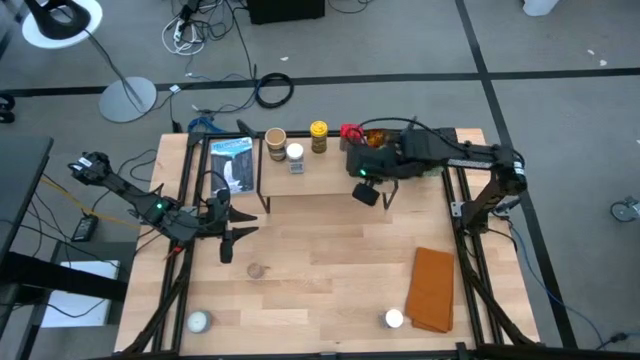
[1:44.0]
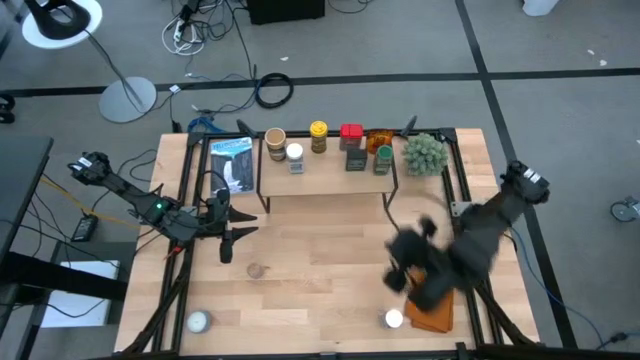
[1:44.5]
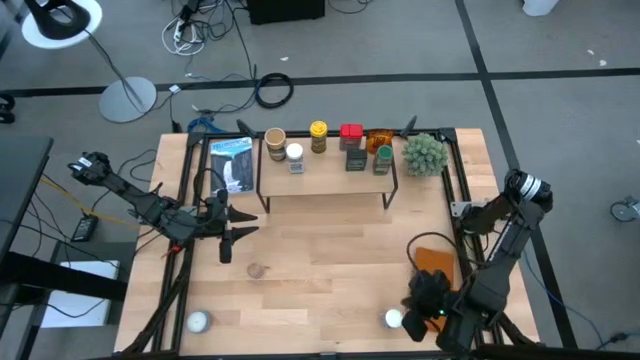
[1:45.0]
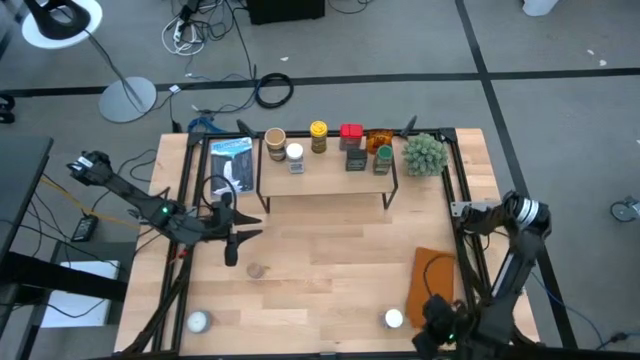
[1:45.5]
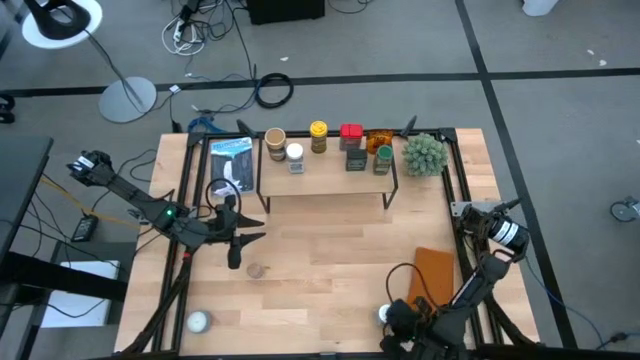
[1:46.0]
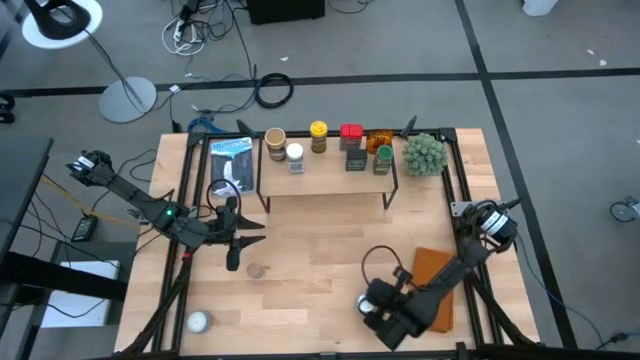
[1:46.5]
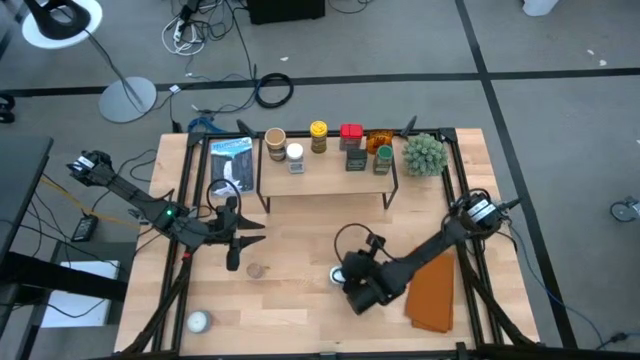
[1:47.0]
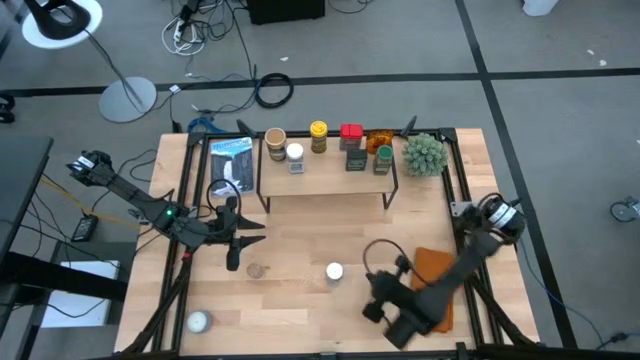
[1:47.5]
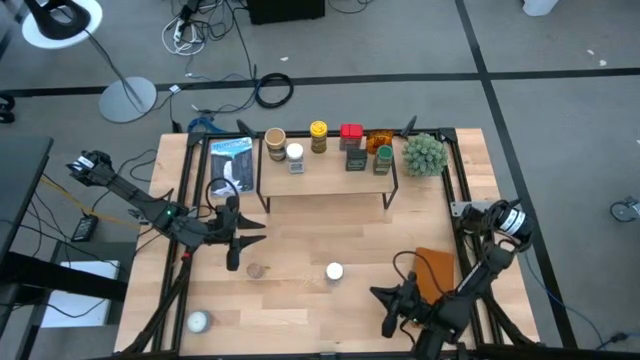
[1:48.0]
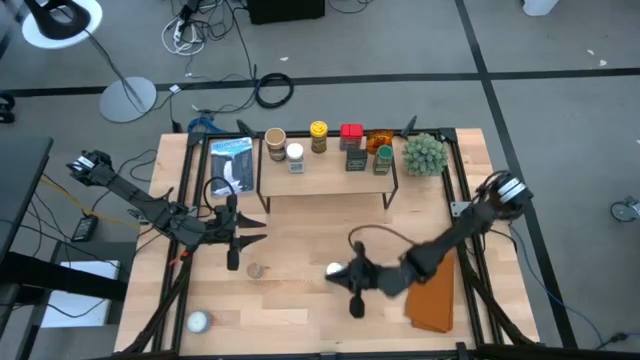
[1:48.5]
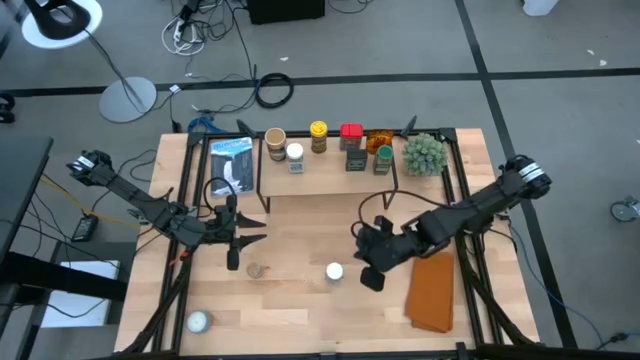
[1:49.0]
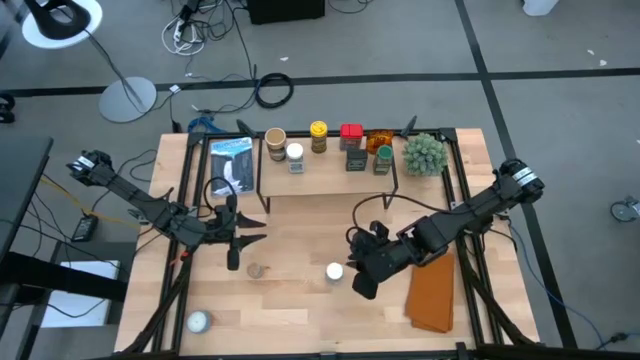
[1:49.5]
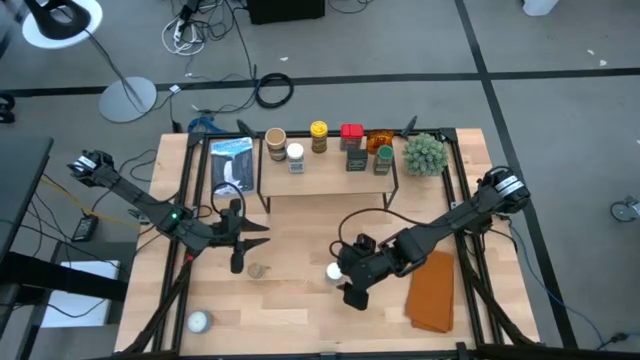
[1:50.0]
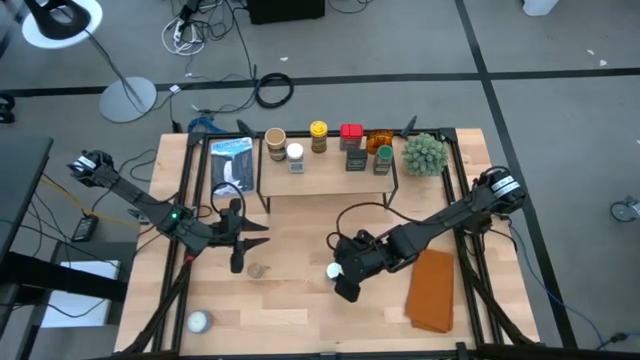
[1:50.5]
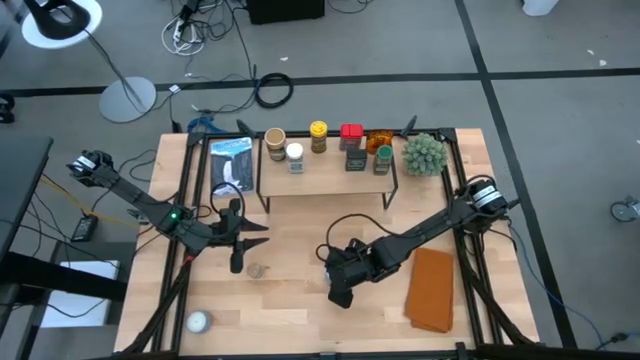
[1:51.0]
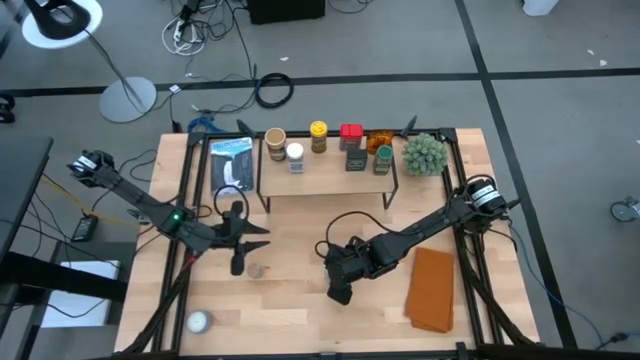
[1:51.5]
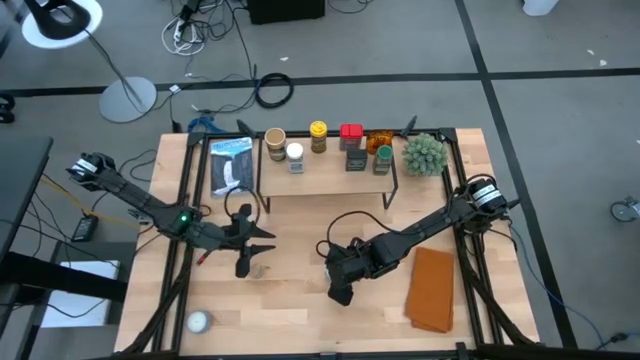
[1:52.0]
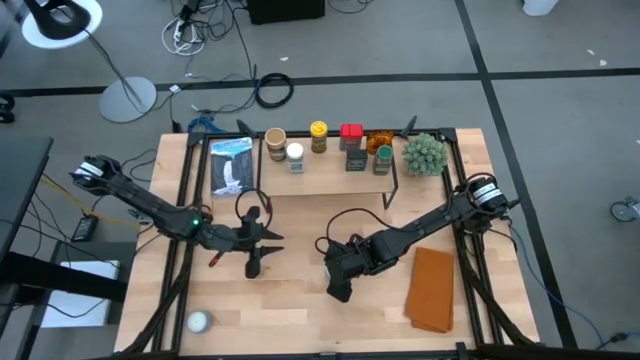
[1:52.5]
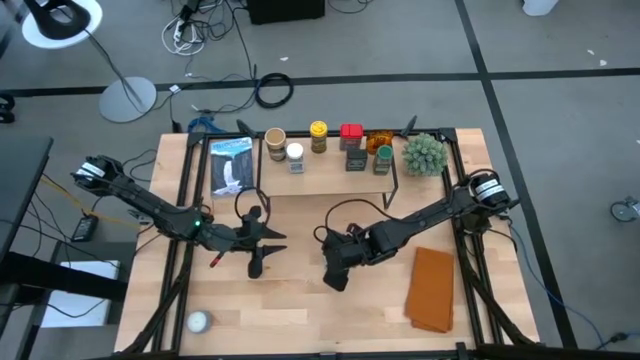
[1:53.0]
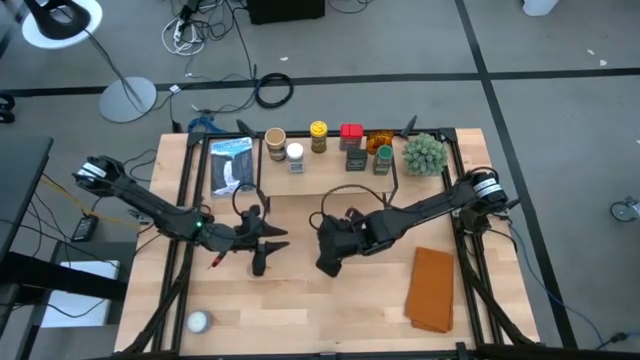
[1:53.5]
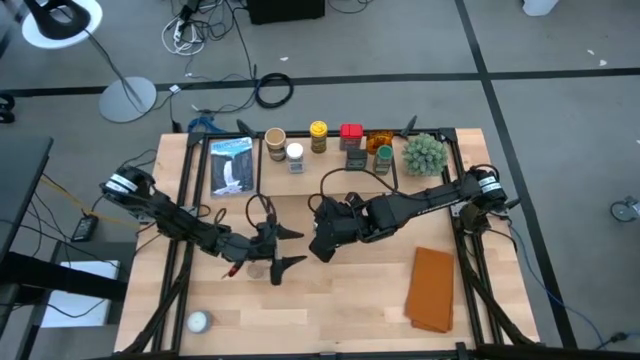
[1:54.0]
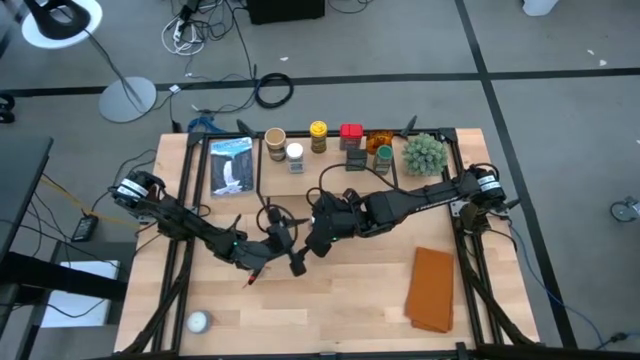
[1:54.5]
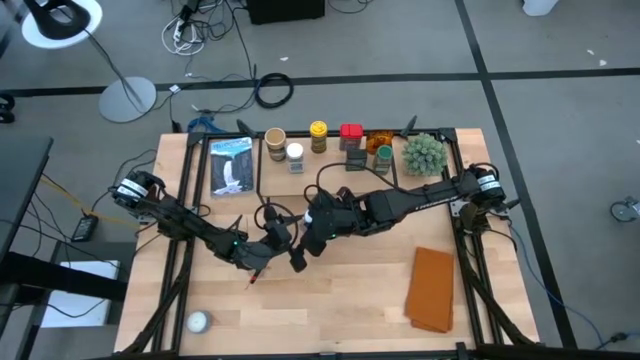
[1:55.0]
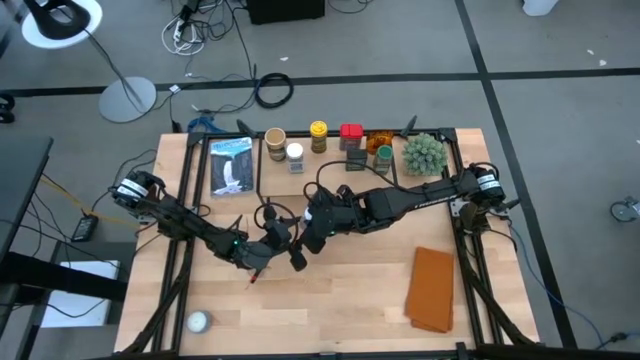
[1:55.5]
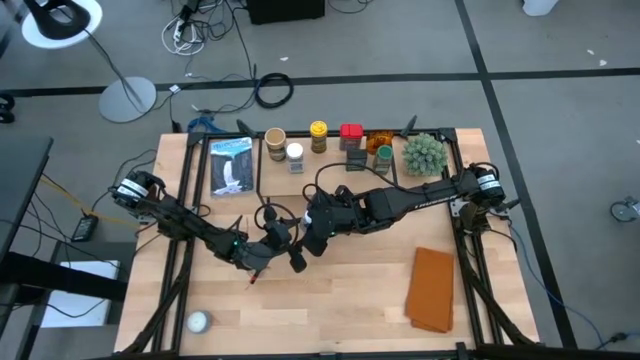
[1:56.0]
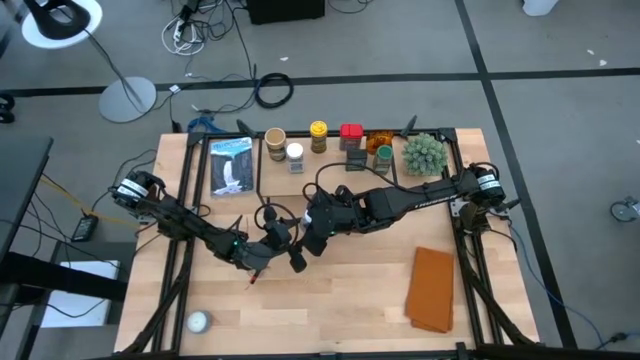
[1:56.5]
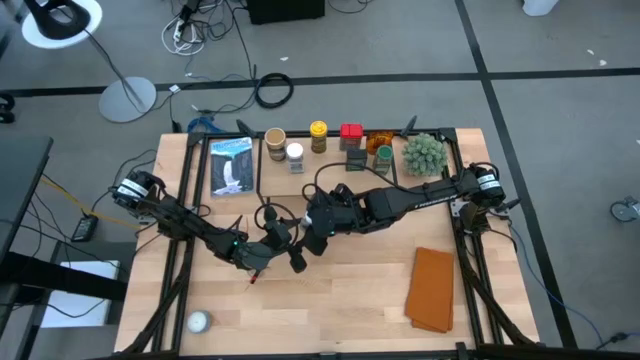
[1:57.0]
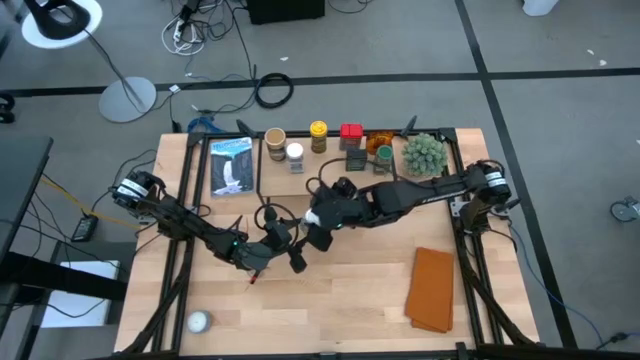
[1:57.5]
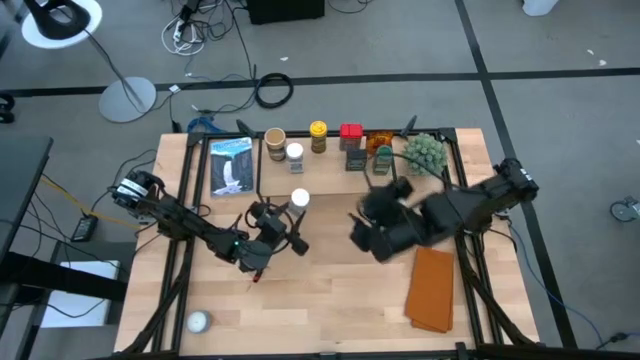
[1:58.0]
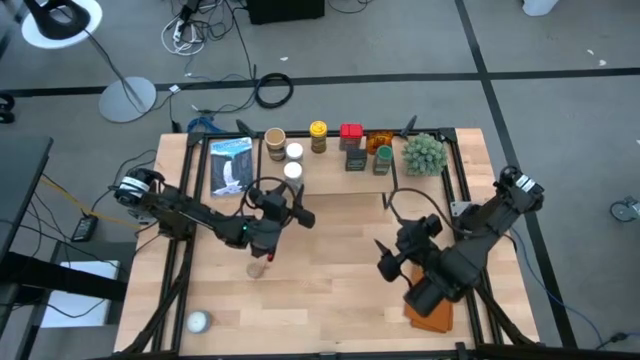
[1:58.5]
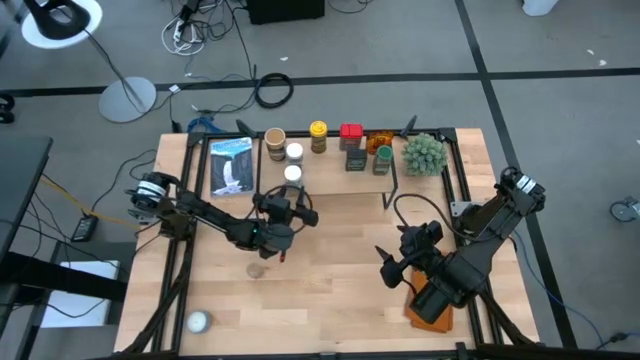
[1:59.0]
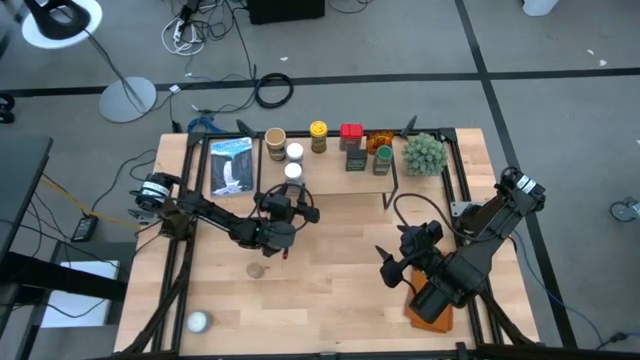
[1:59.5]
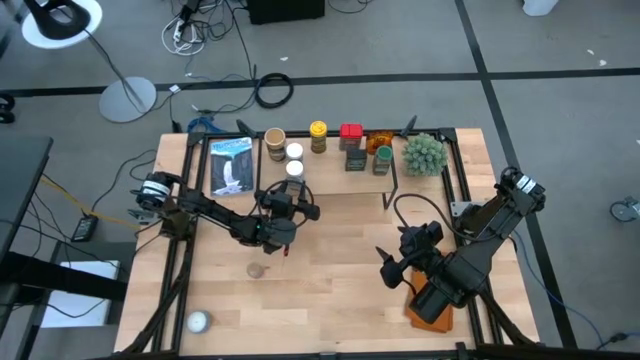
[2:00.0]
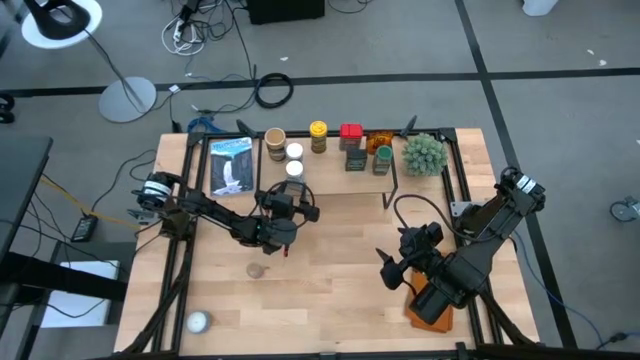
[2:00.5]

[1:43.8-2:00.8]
Task: Shelf spices
Put the white seasoning bottle on the shelf

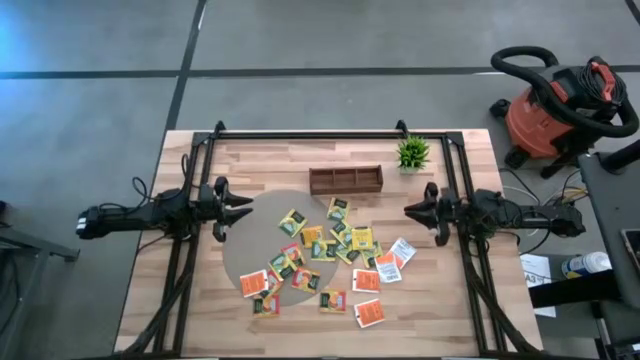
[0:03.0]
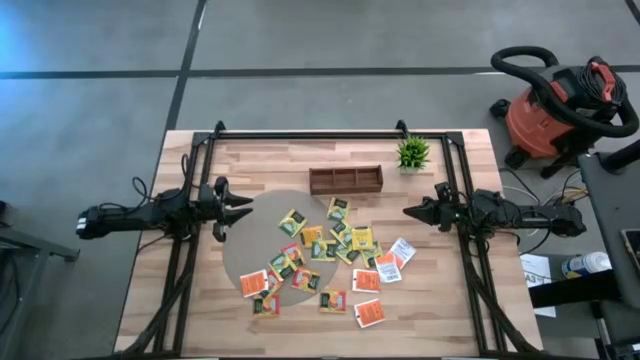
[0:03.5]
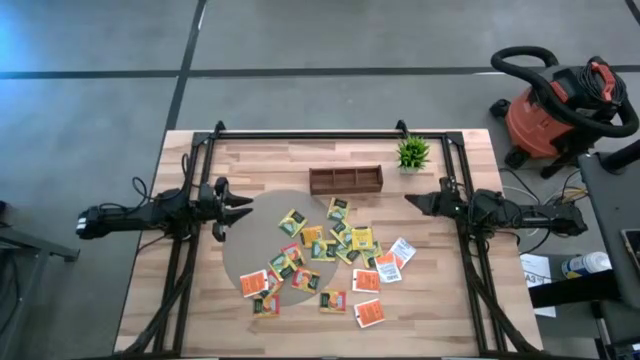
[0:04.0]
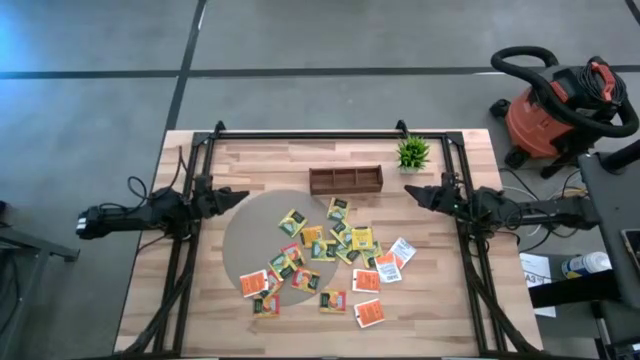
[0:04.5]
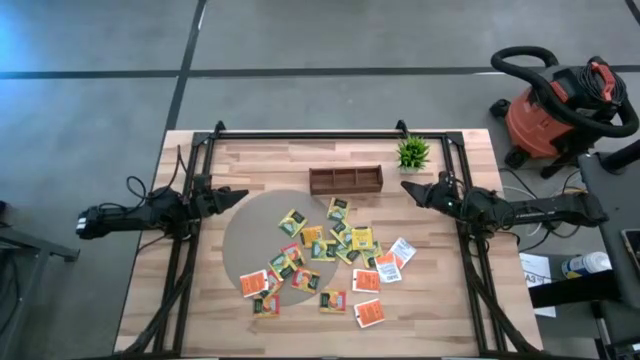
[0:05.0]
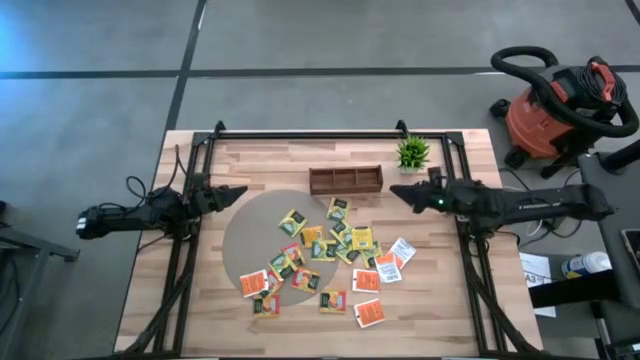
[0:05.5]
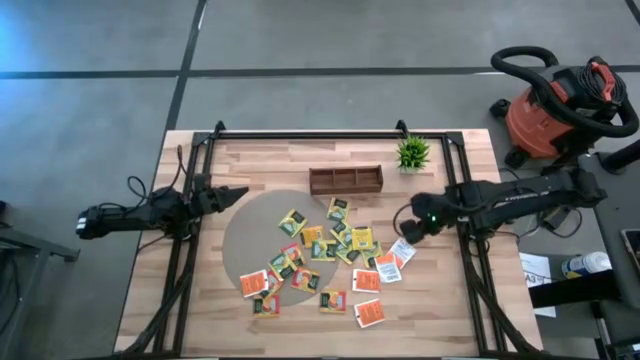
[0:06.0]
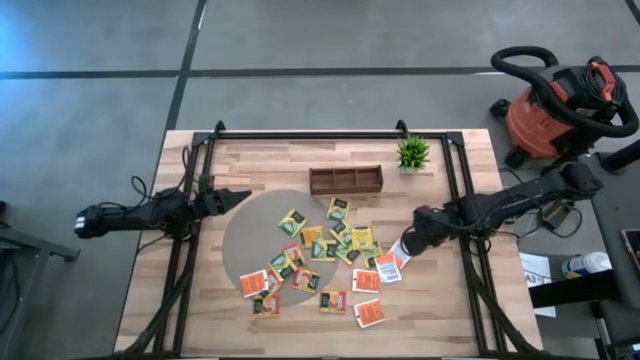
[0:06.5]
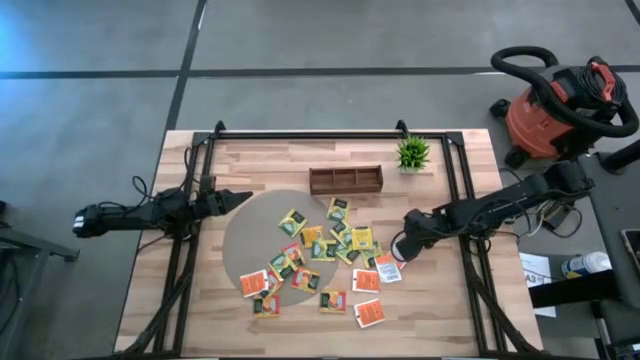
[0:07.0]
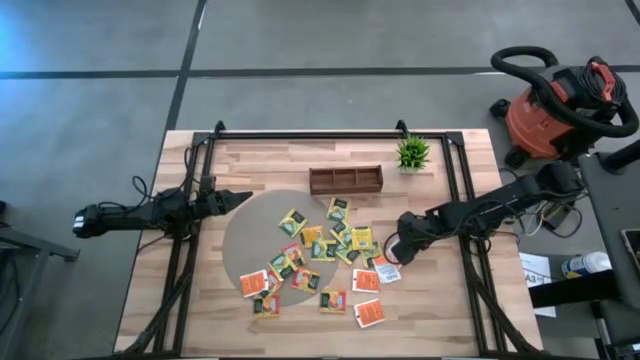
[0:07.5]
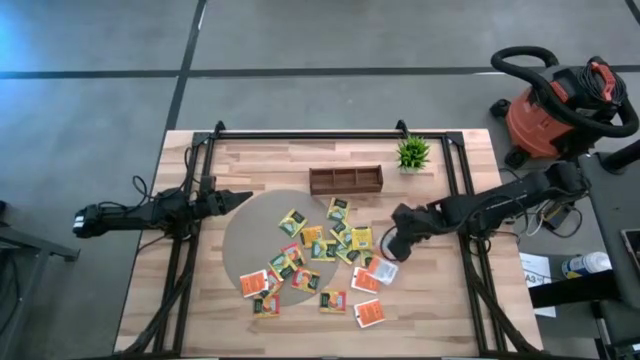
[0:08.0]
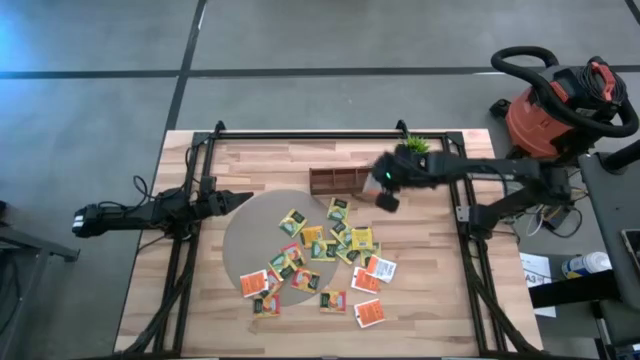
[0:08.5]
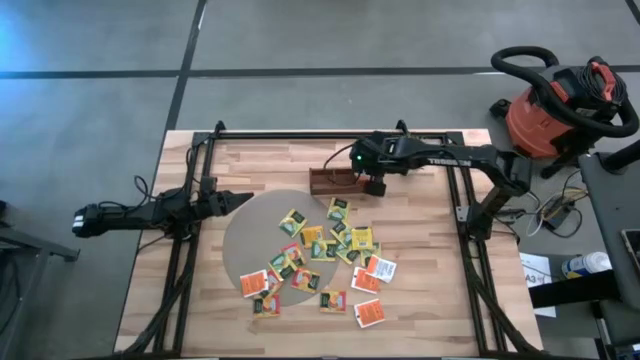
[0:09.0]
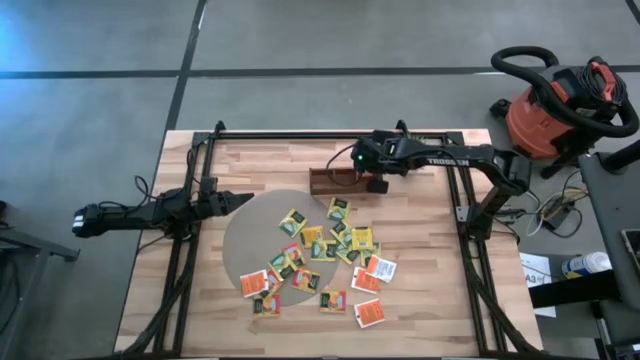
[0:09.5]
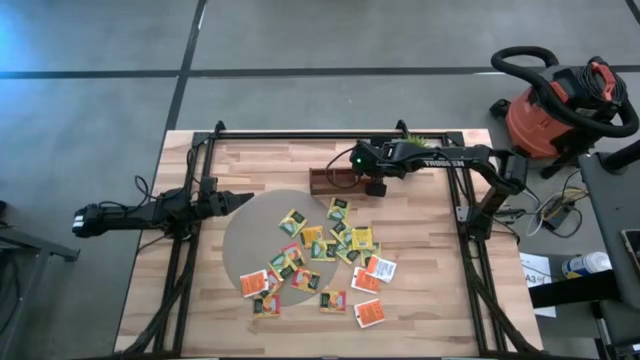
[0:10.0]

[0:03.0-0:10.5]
Task: Pick & Place Tea
Put the orange tea sachet into the right compartment of the wooden organizer
